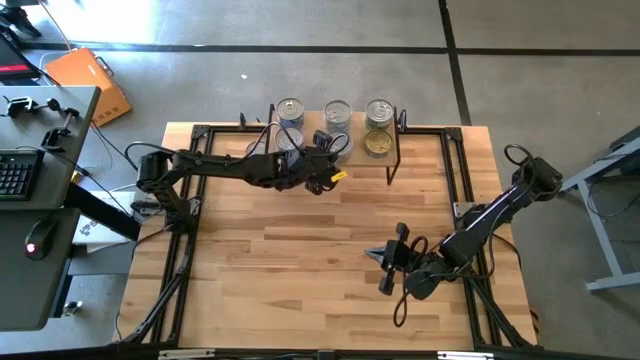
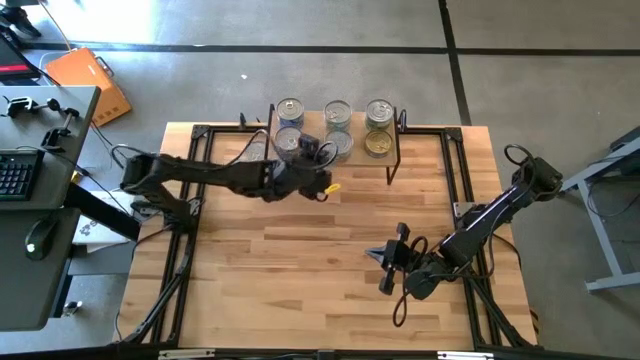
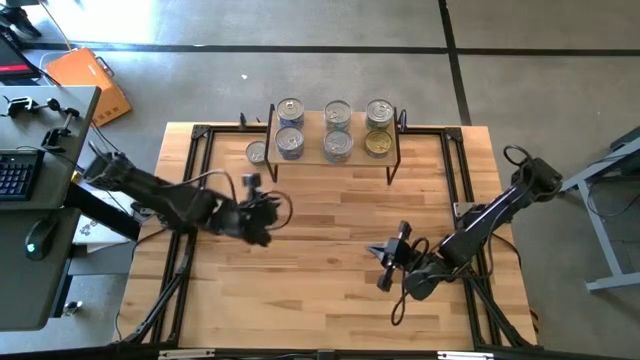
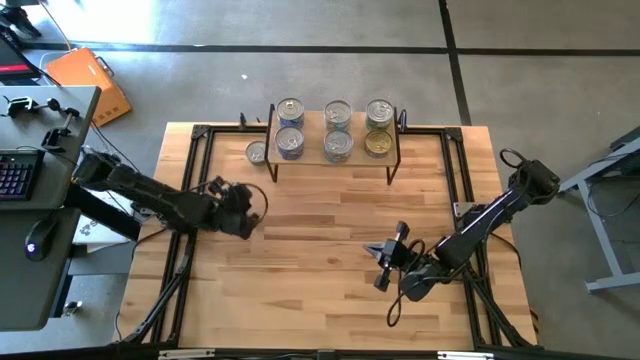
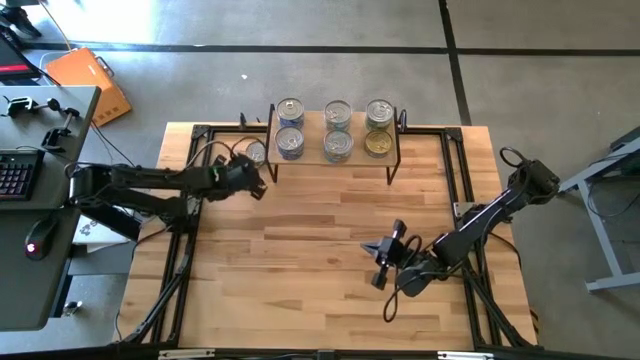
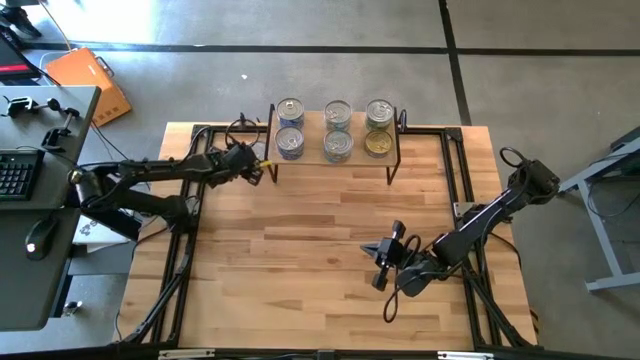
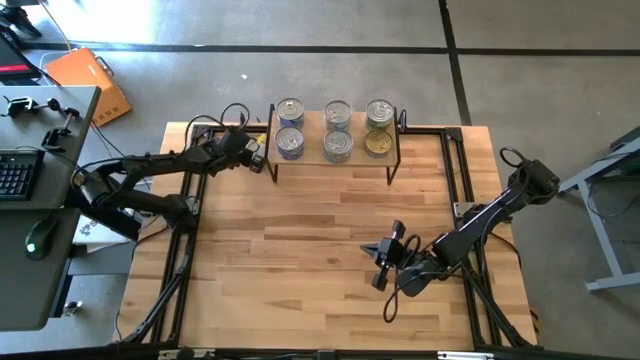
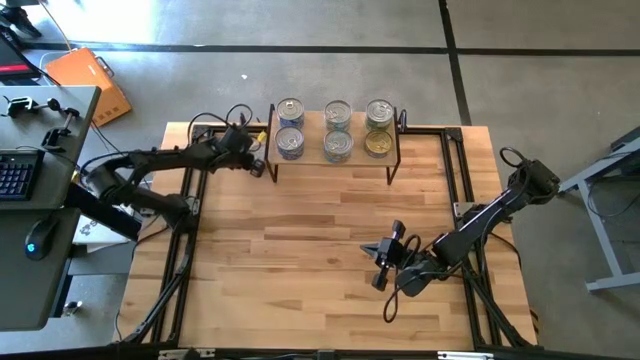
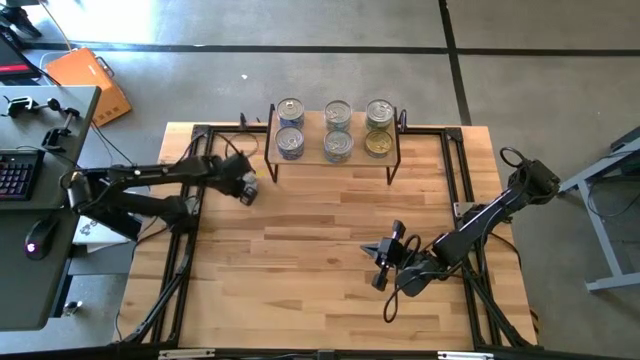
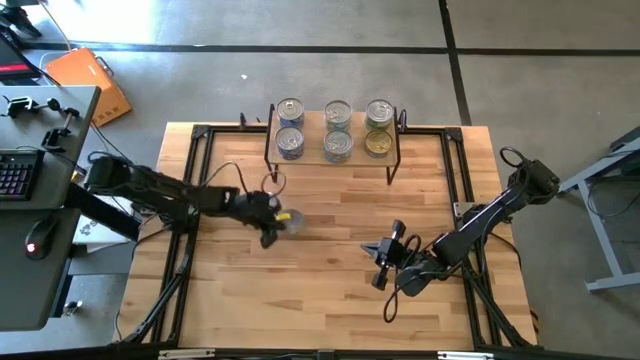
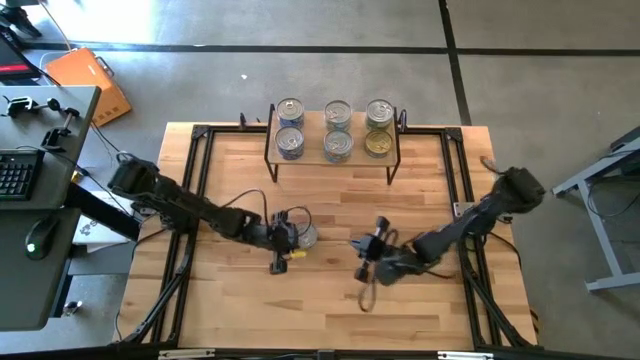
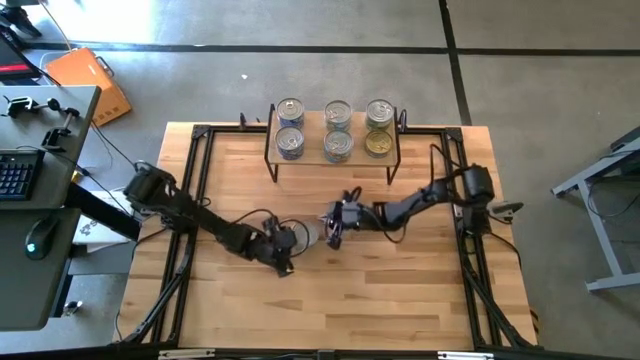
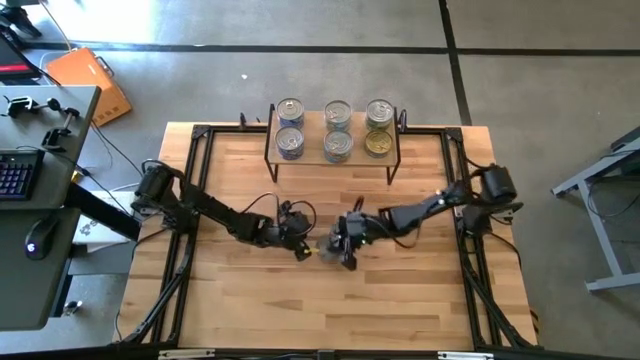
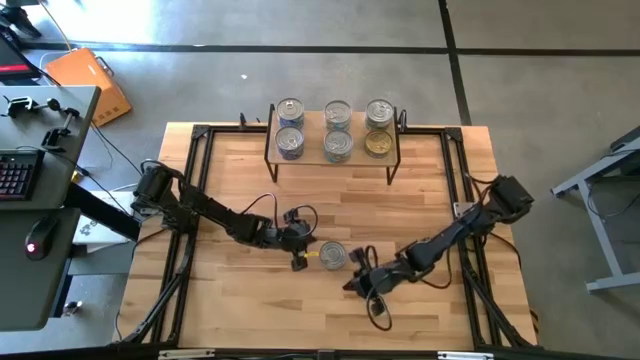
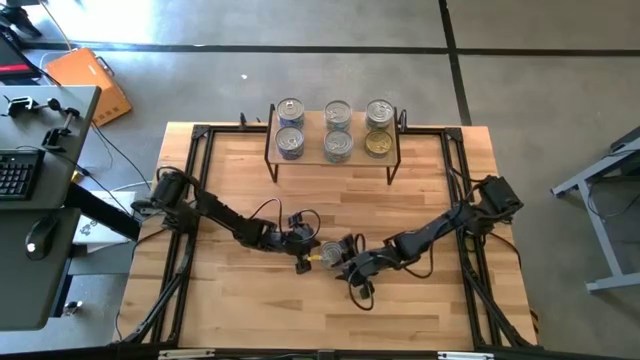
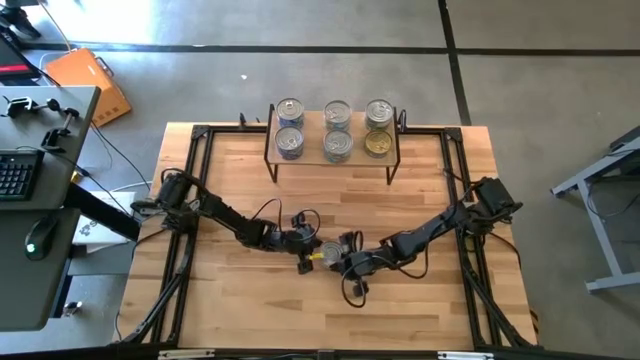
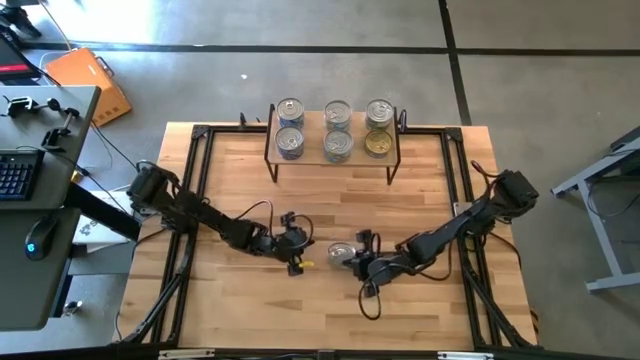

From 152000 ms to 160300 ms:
Task: Stack canned seafood by type on shelf
Stack the green tuna can on top of the other green tuna can on the shelf

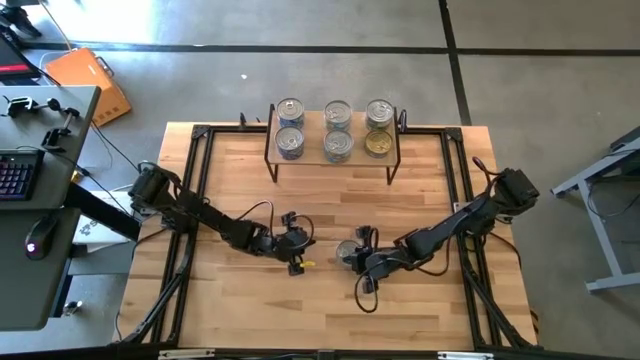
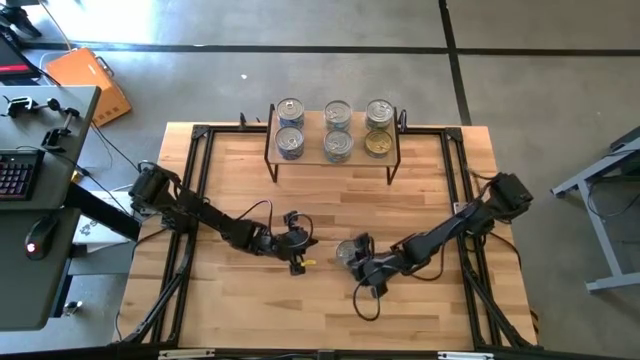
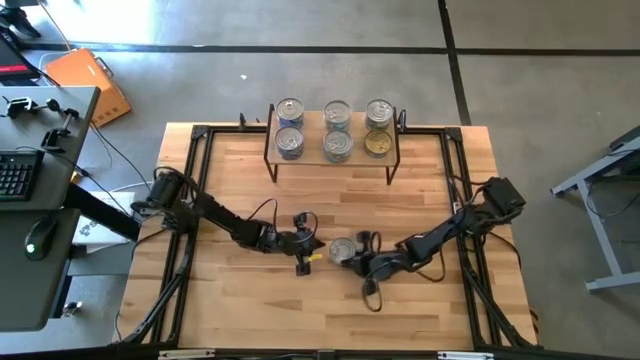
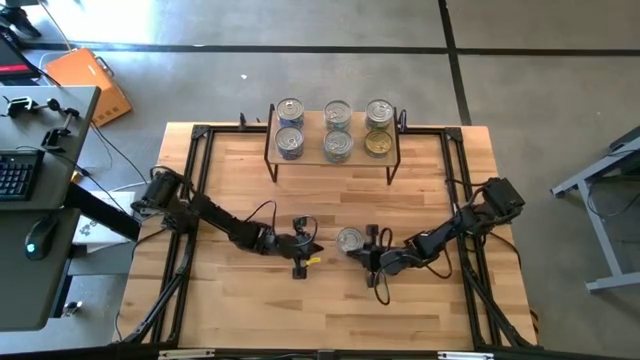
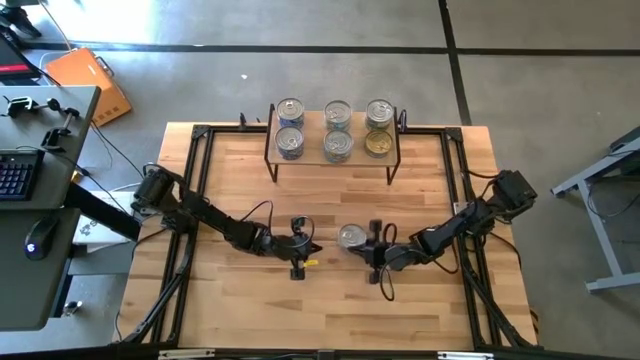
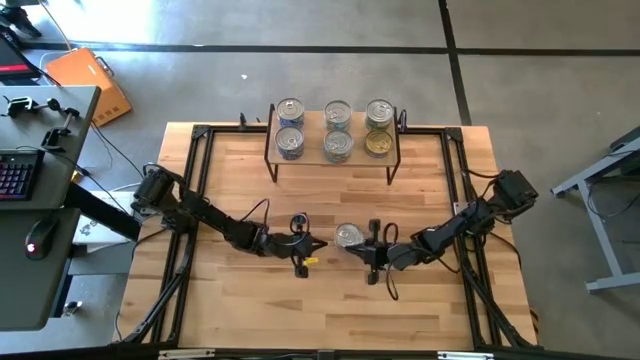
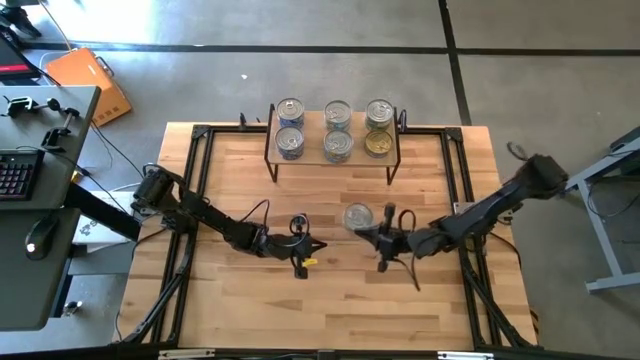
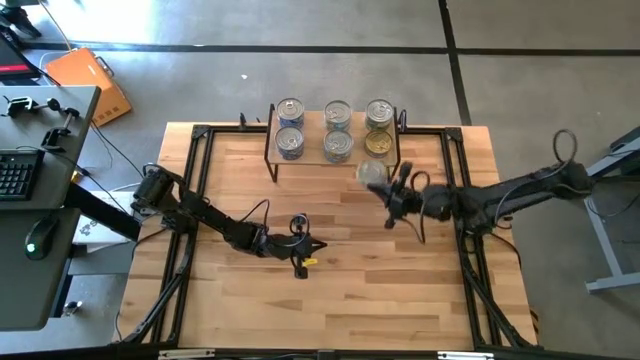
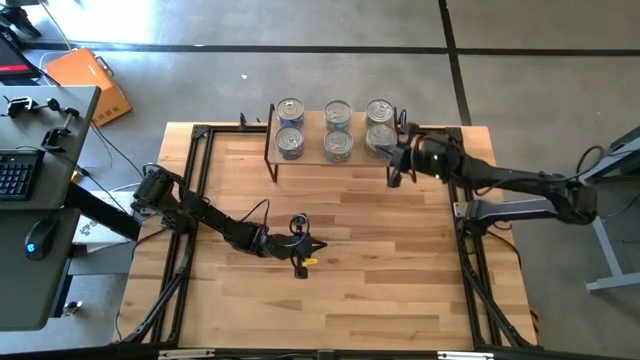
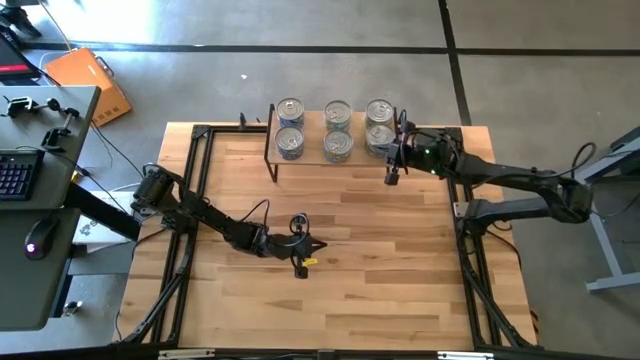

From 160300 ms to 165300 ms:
Stack the green tuna can on top of the other green tuna can on the shelf

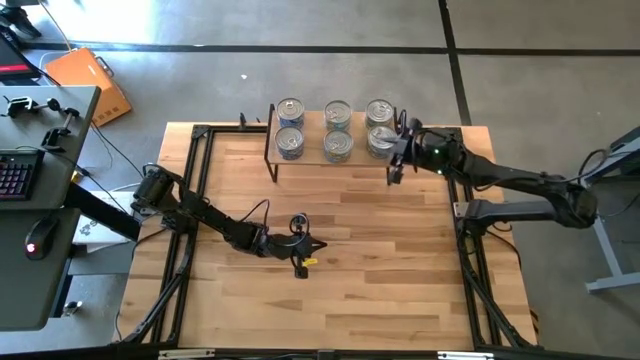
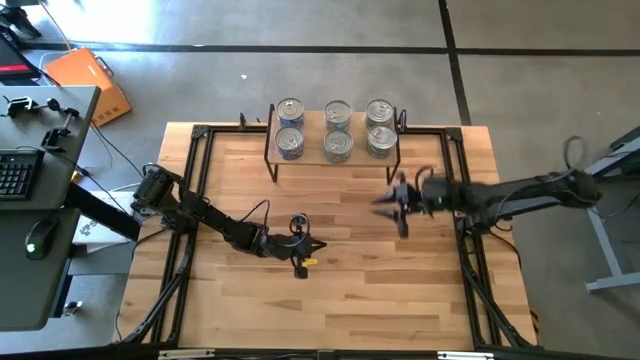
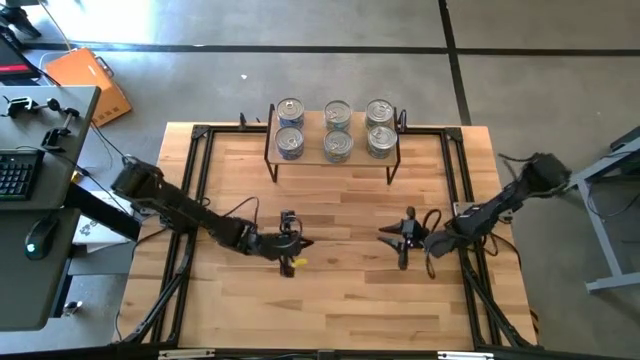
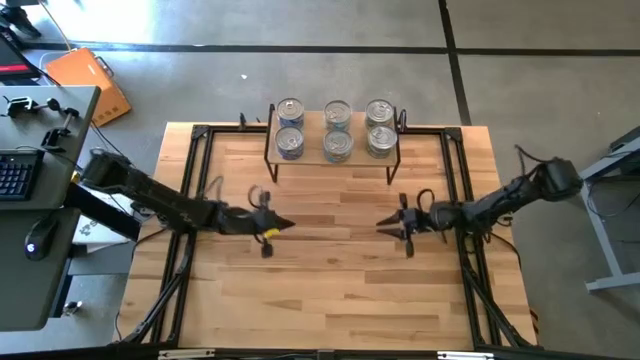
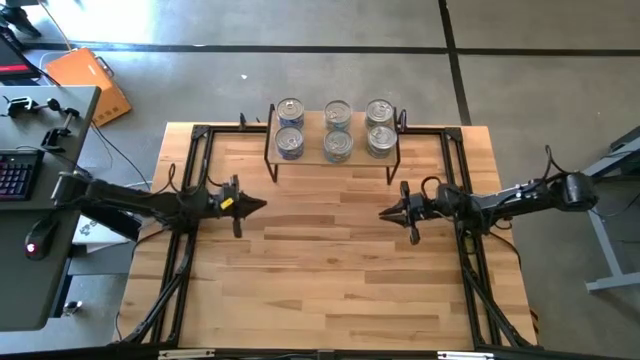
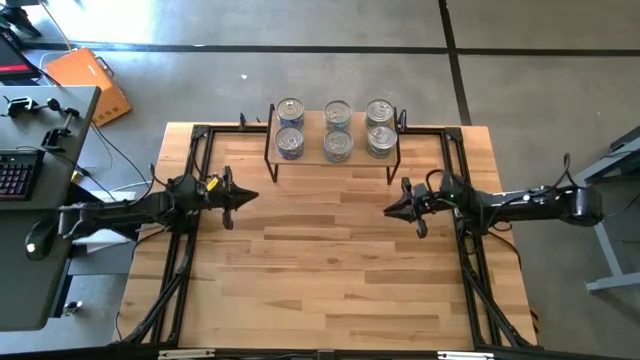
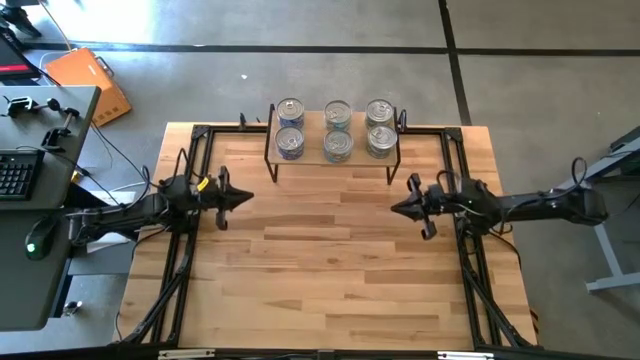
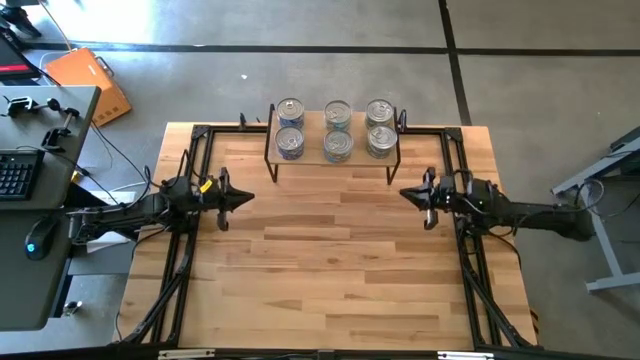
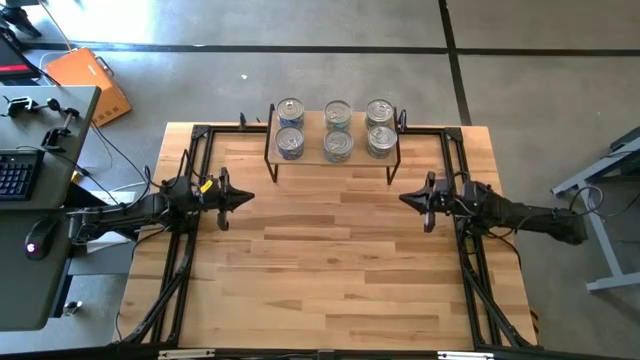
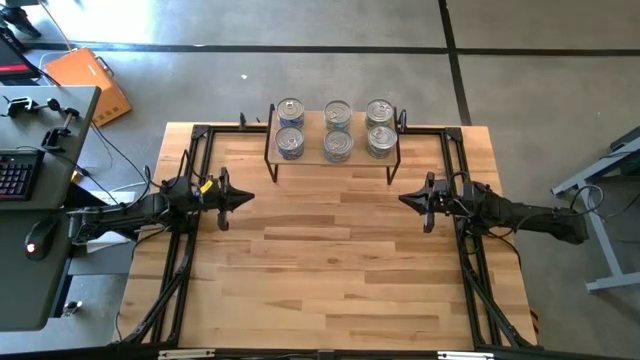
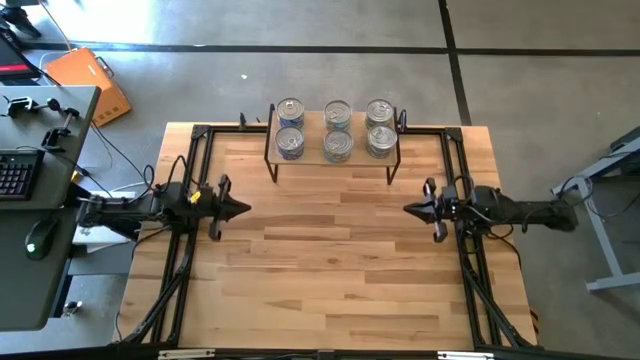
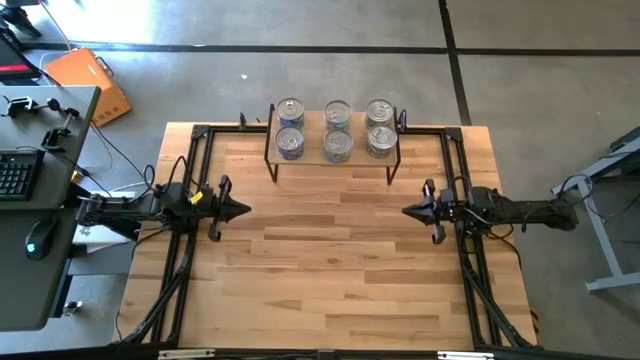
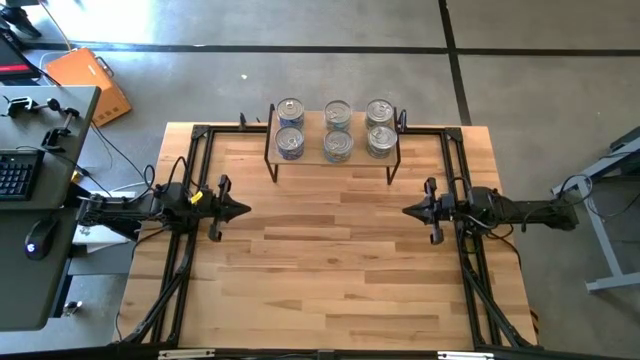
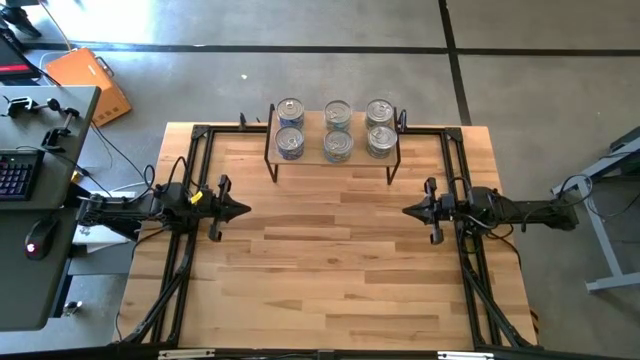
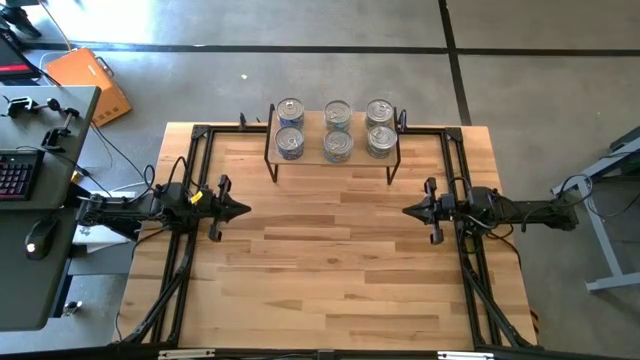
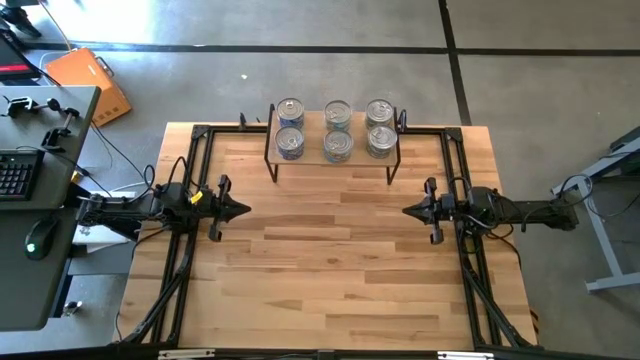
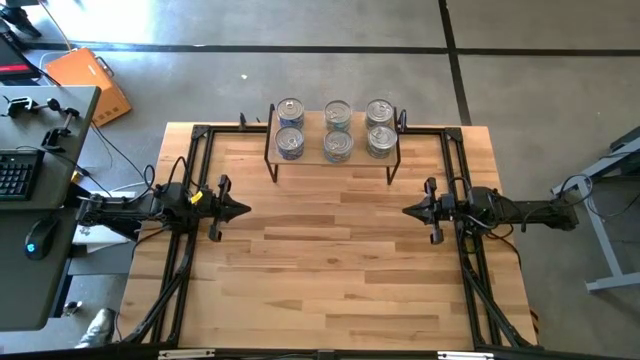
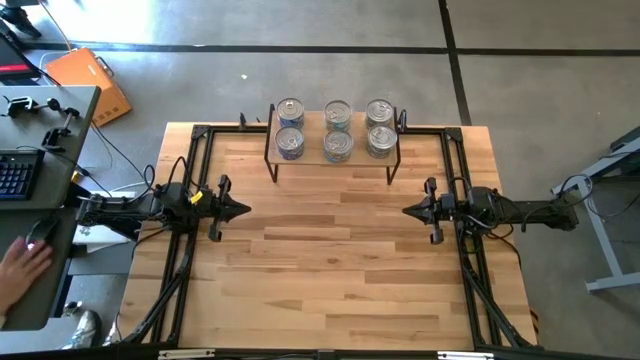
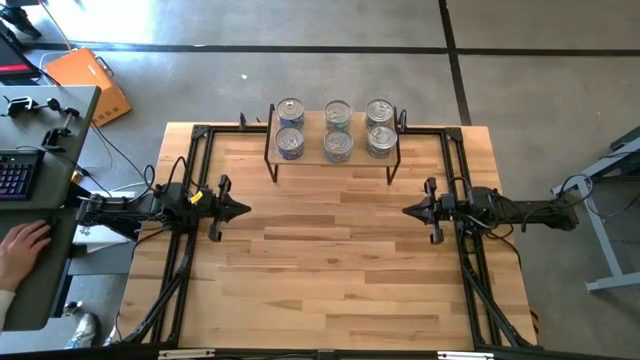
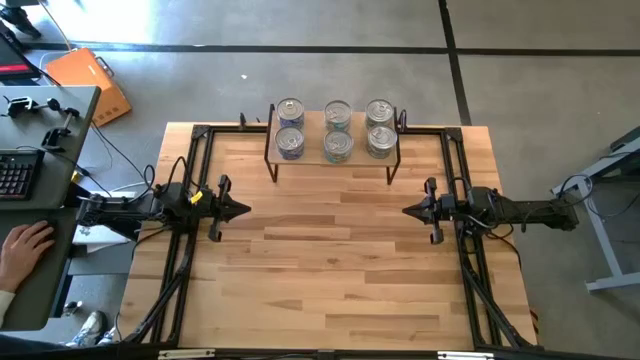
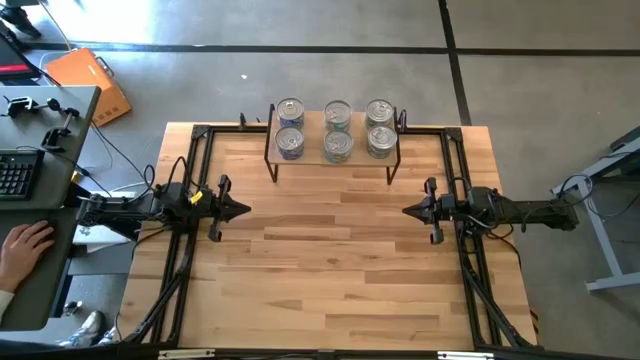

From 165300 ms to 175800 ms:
Return to Home Position
